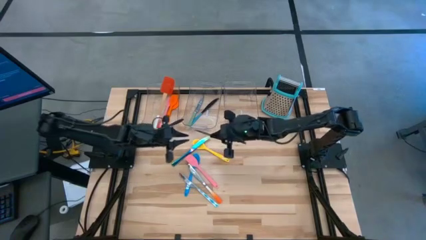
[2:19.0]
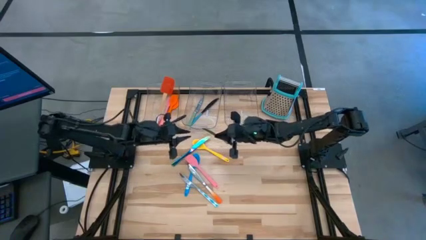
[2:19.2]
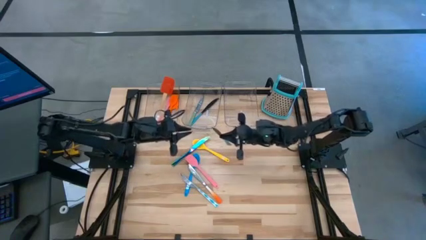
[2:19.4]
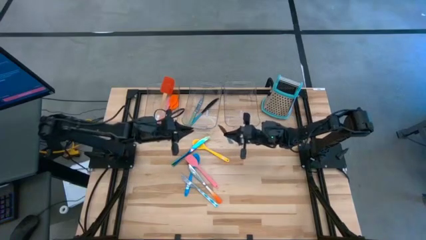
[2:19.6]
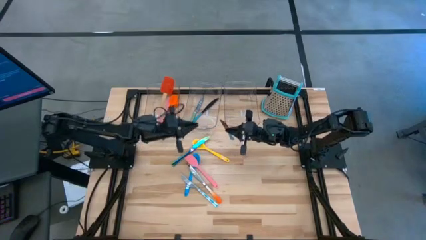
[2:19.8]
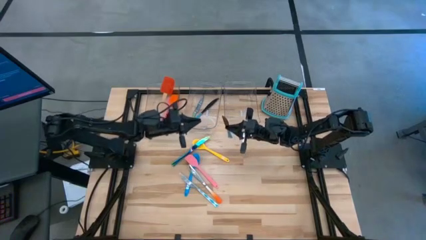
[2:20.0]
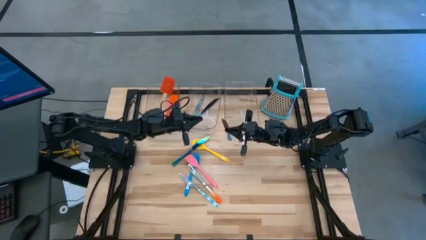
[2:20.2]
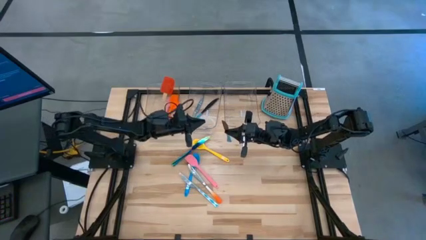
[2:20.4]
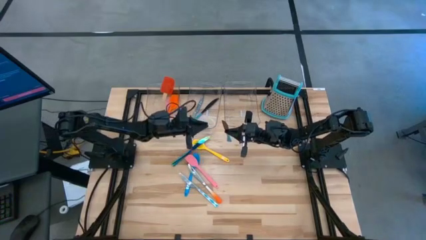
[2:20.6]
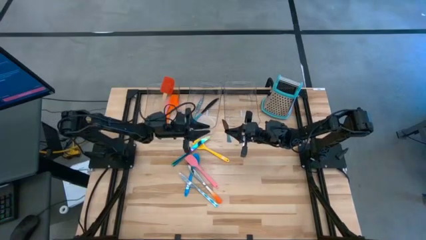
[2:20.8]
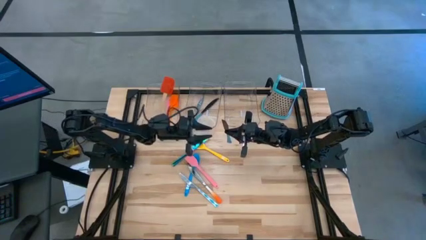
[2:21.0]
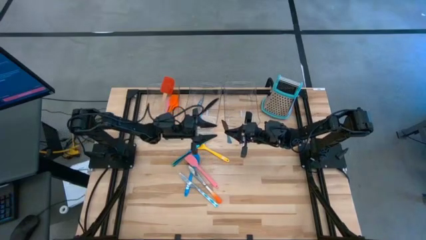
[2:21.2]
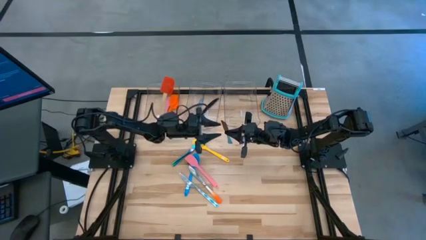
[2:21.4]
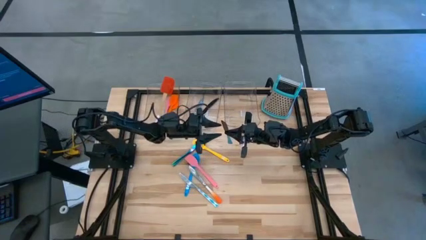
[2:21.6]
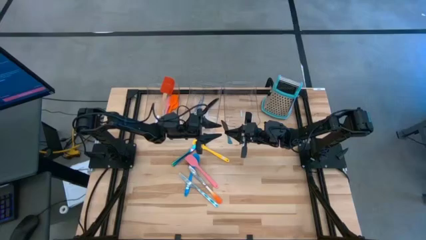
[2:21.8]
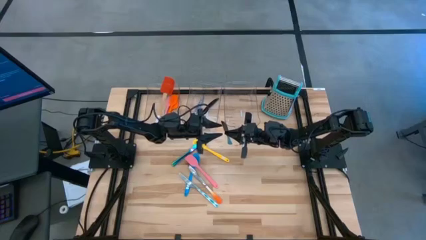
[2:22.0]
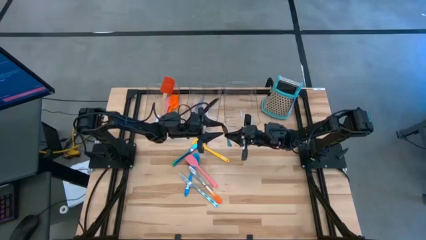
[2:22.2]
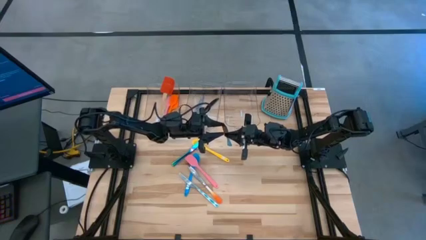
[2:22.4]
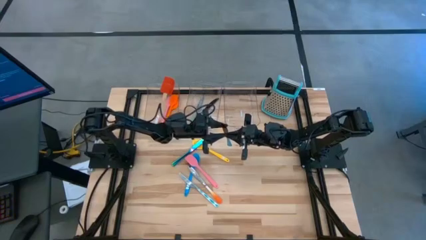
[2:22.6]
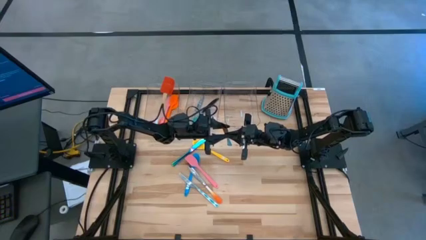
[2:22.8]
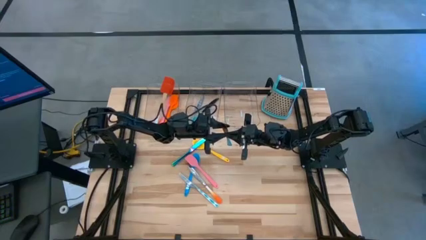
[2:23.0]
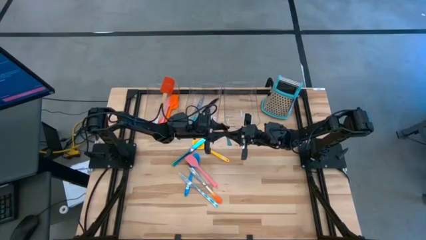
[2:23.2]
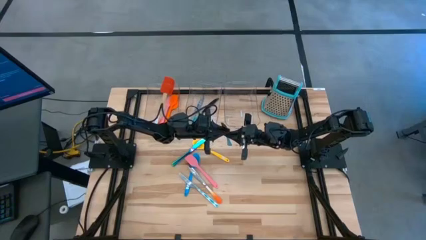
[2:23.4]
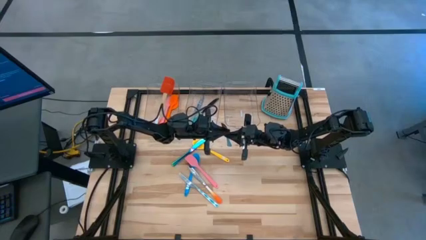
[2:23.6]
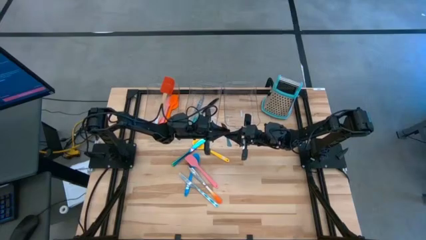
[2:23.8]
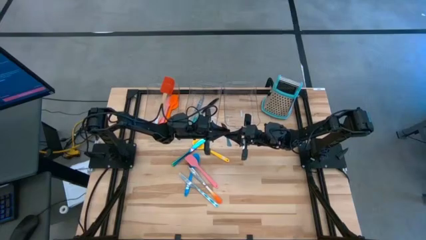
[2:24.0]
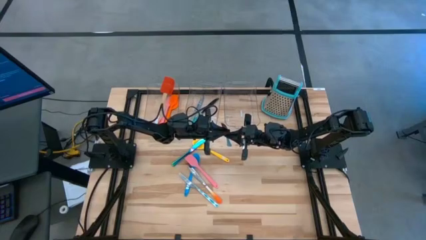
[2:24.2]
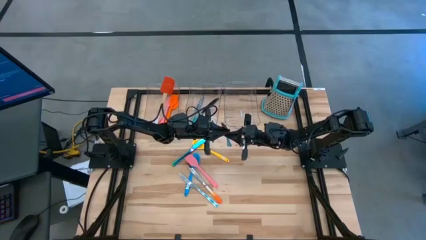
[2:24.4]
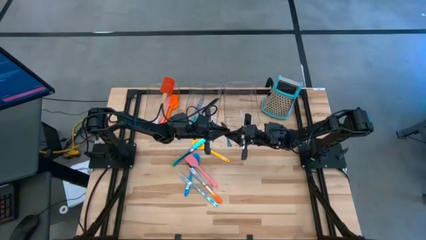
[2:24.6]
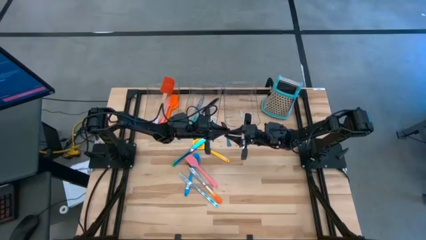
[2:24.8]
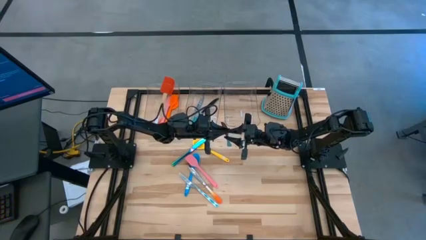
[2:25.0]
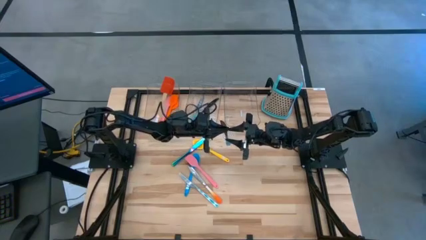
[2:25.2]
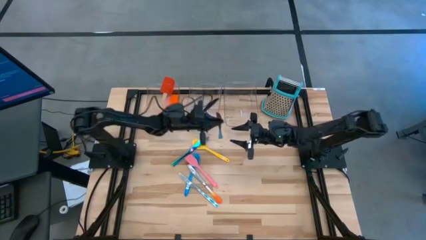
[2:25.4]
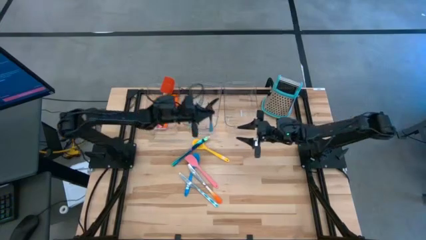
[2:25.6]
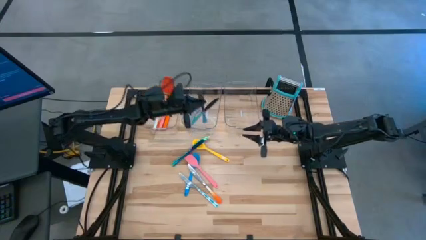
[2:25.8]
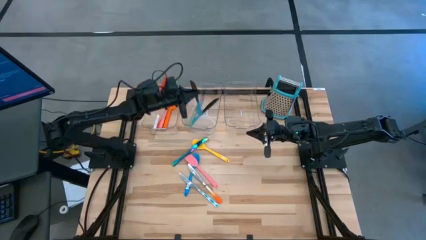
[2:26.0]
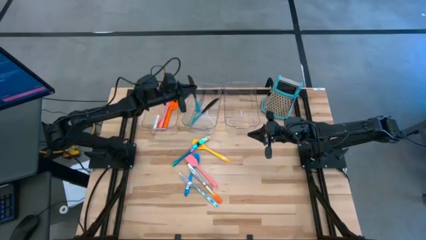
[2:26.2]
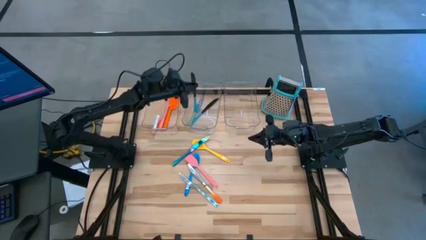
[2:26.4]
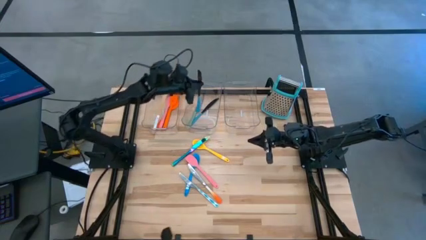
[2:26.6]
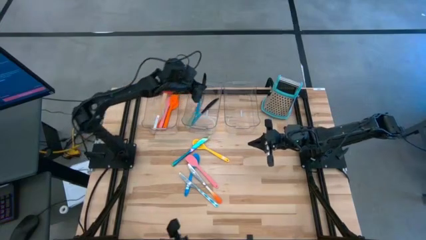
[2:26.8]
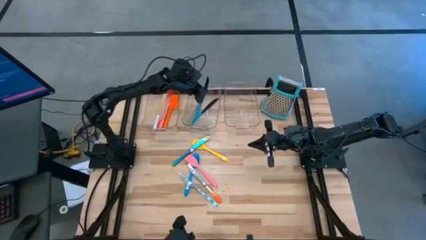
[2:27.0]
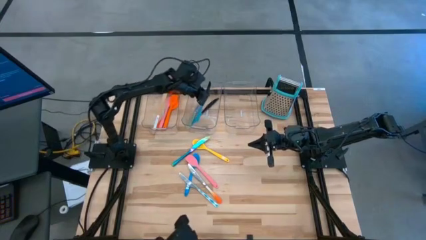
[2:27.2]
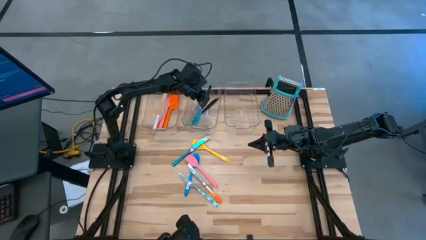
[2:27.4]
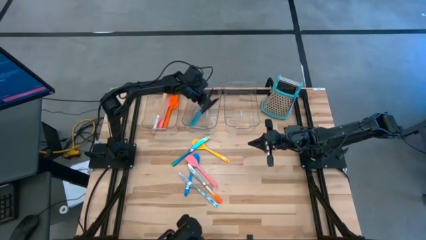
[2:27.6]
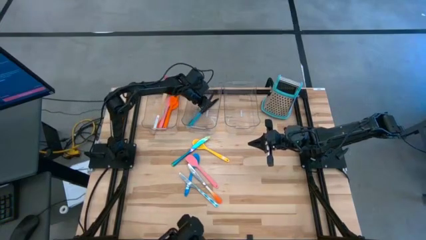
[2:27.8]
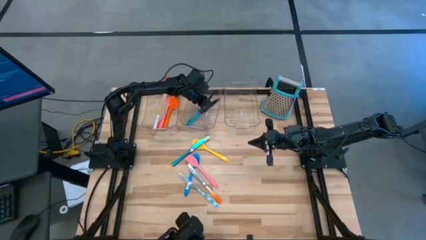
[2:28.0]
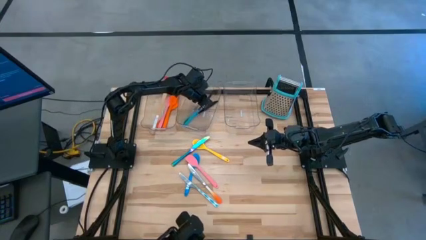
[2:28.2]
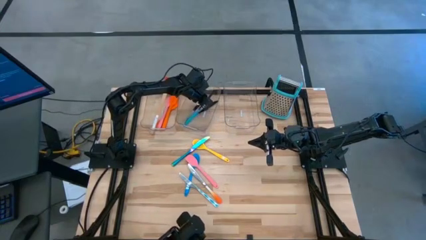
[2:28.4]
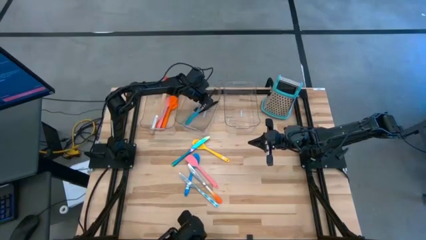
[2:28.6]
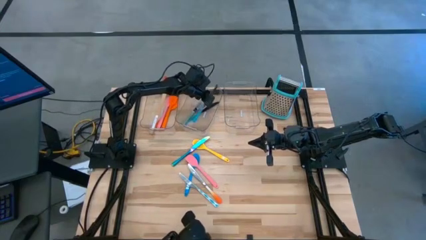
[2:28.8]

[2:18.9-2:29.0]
Task: Pick & Place Kitchen Items
Put the blue knife into the middle transparent bin

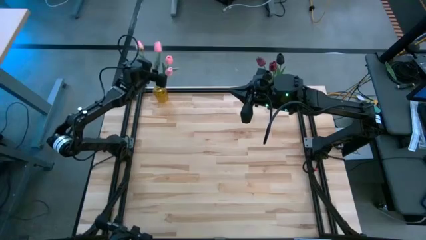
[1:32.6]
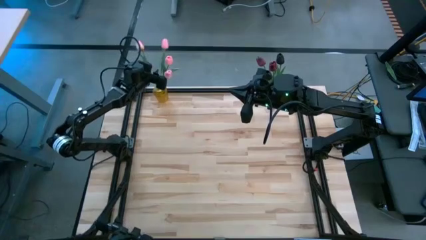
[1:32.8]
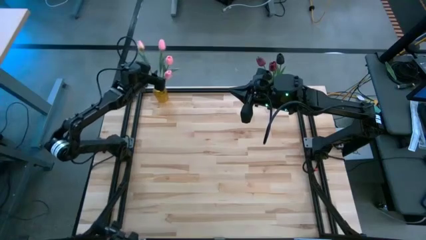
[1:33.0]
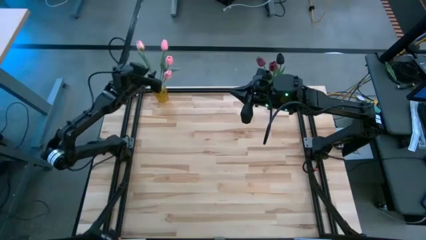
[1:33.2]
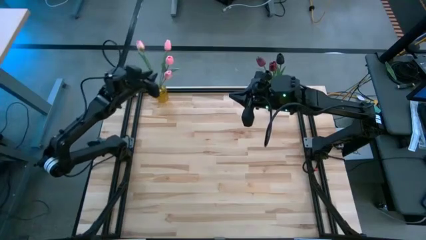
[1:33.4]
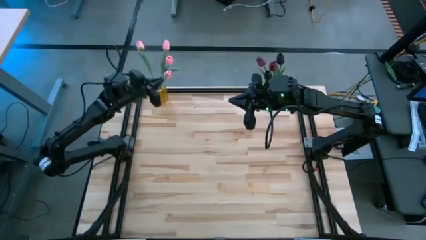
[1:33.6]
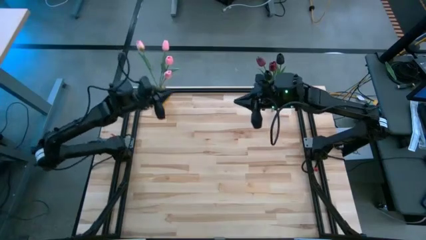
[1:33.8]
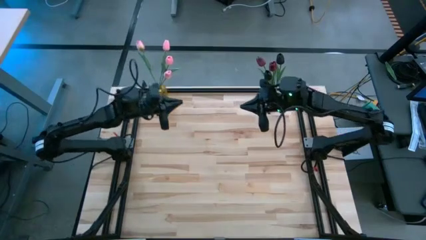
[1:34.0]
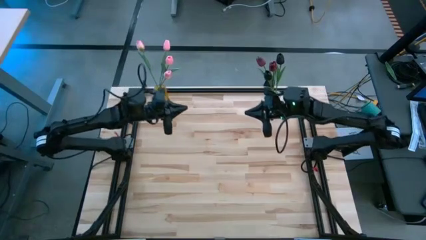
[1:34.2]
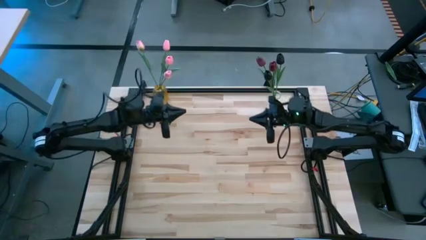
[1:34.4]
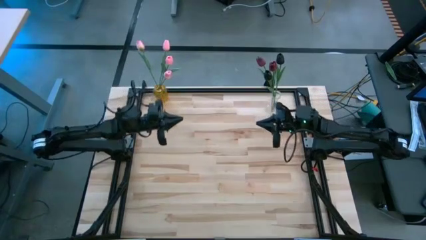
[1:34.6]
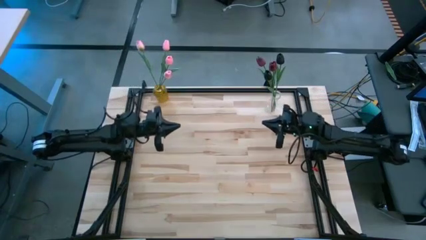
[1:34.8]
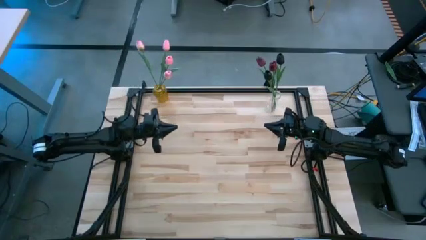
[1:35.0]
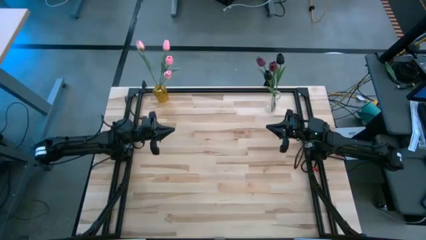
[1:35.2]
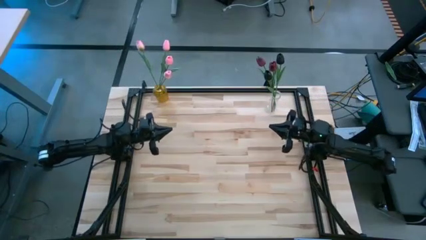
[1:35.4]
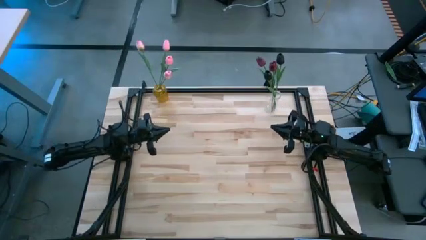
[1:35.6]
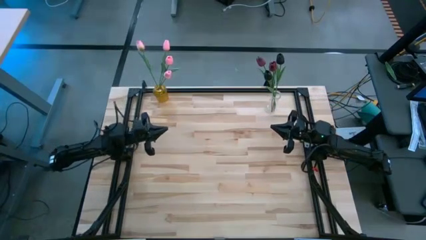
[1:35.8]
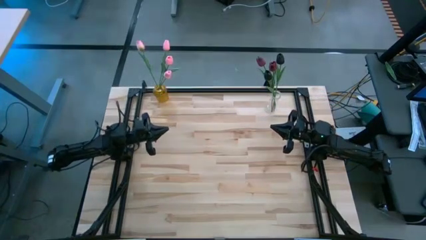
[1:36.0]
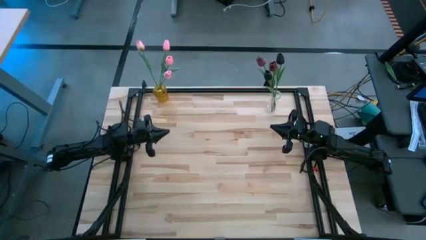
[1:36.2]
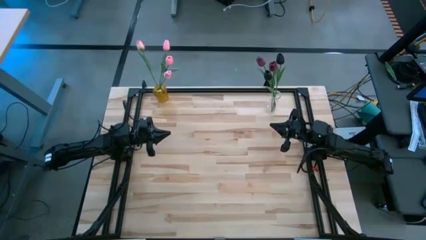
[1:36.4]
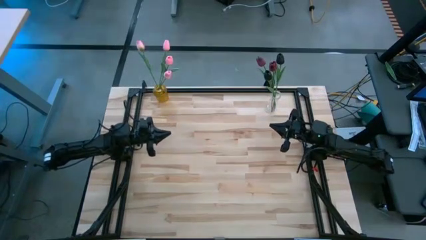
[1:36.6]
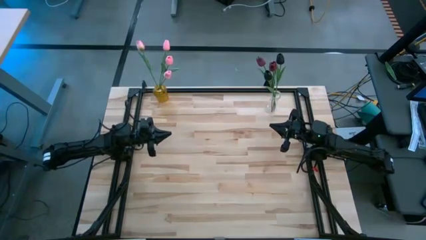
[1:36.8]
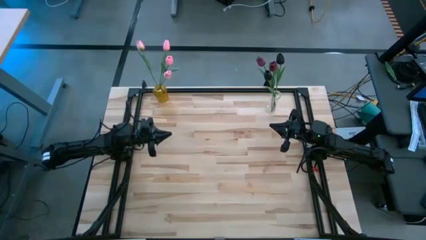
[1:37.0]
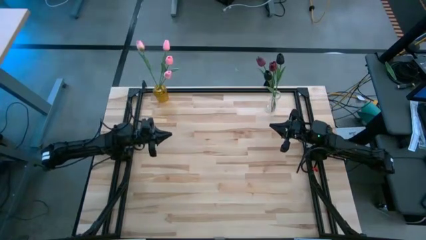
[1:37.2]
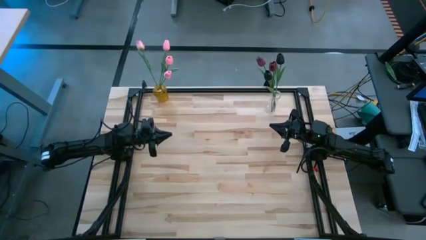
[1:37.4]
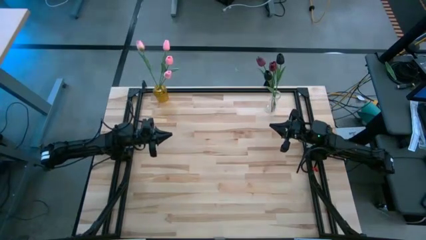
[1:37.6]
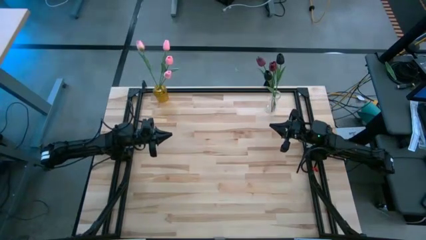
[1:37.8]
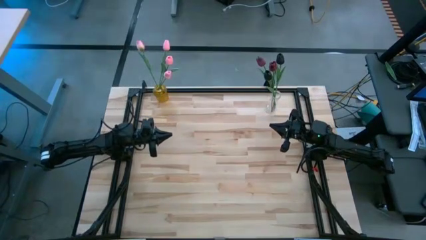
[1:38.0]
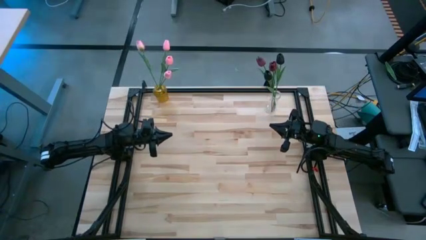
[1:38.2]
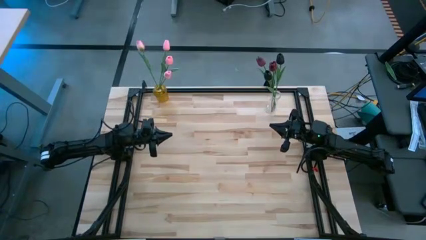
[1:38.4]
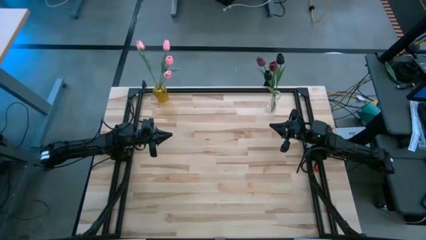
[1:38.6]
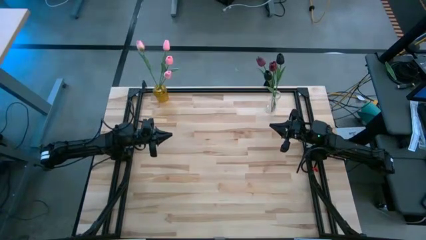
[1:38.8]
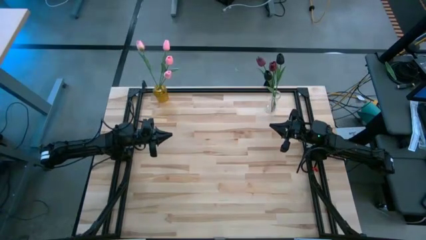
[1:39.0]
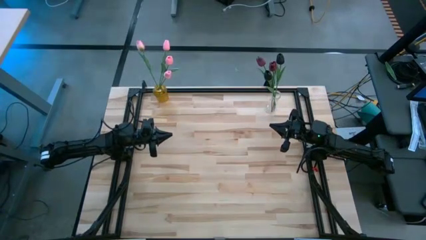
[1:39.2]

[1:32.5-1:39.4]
Task: Sort flowers into vase by color
Return to Home Position
